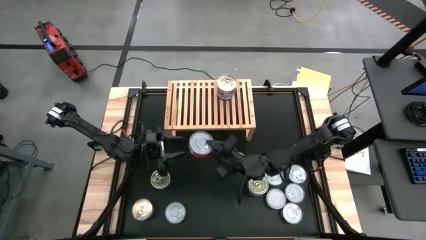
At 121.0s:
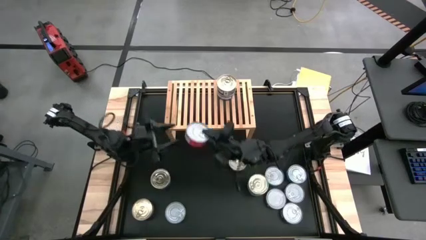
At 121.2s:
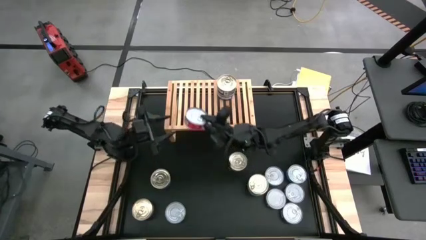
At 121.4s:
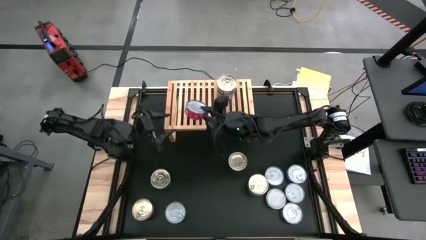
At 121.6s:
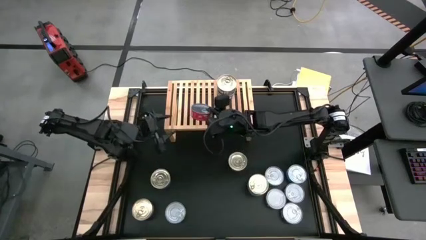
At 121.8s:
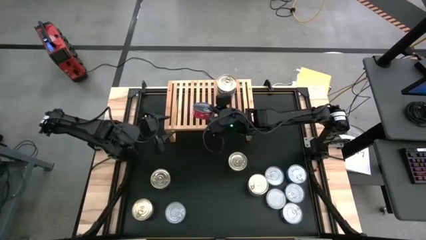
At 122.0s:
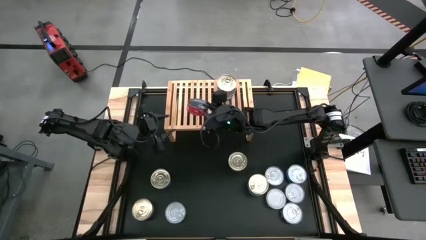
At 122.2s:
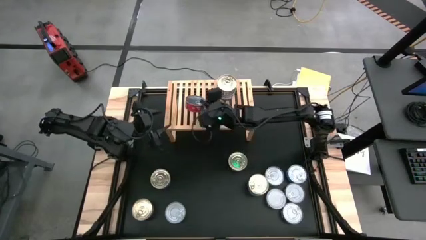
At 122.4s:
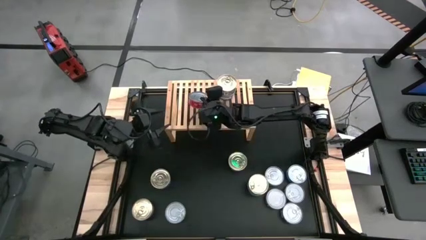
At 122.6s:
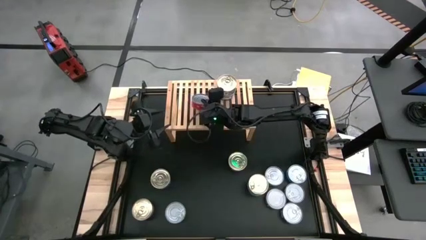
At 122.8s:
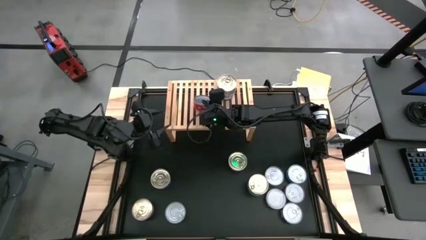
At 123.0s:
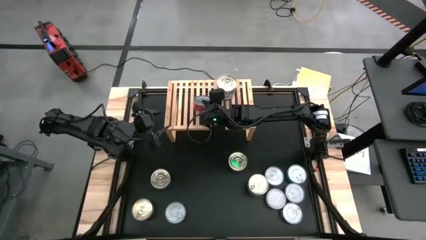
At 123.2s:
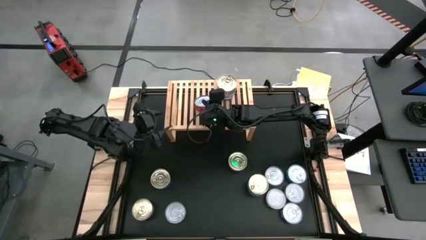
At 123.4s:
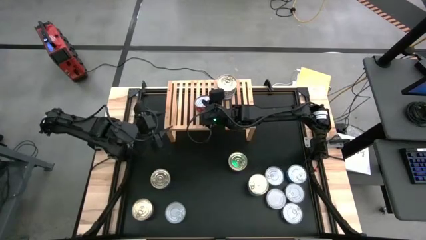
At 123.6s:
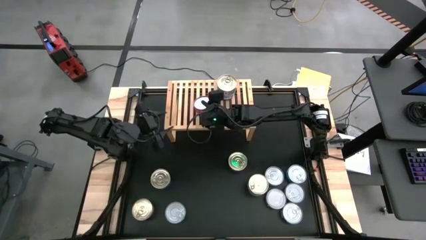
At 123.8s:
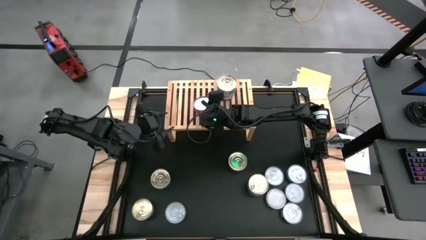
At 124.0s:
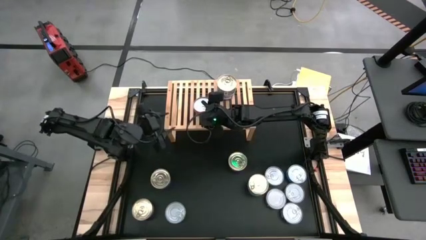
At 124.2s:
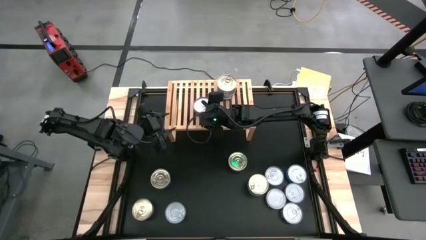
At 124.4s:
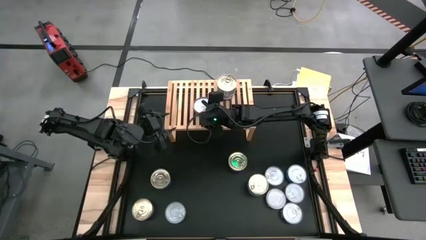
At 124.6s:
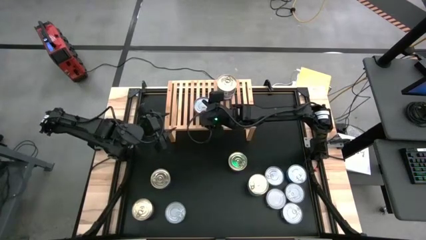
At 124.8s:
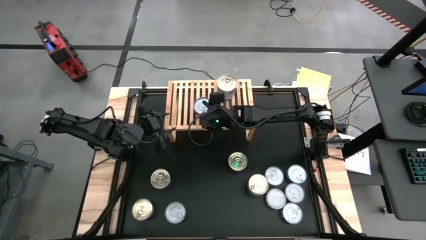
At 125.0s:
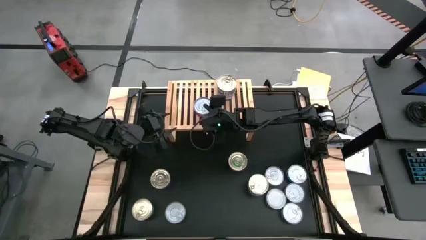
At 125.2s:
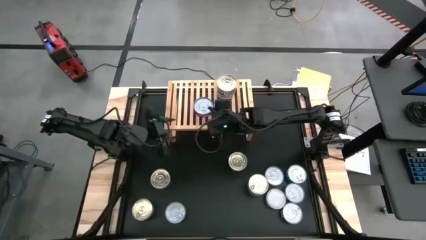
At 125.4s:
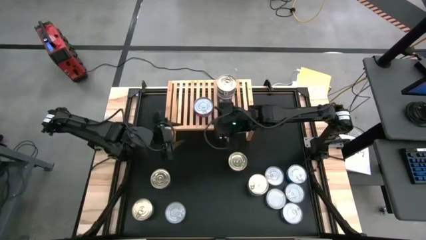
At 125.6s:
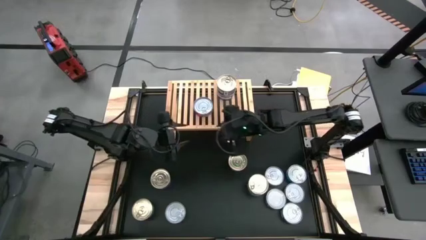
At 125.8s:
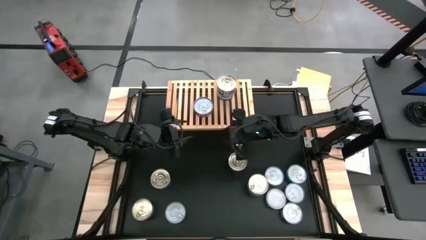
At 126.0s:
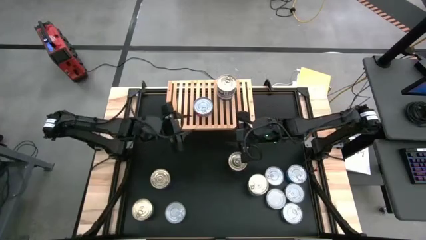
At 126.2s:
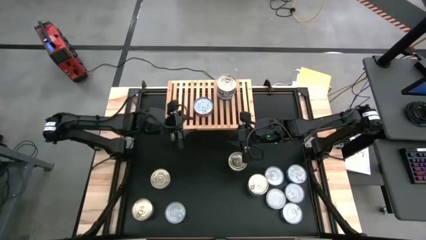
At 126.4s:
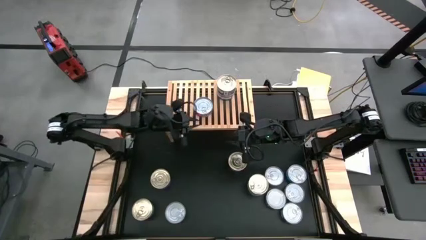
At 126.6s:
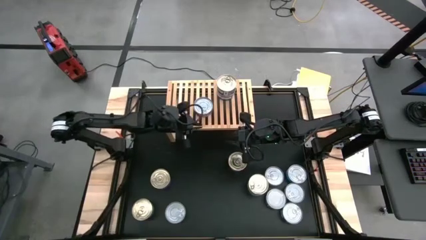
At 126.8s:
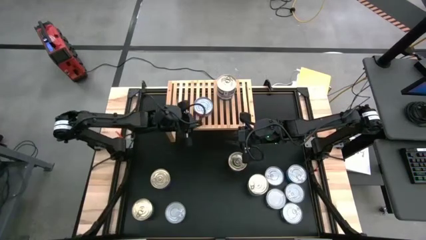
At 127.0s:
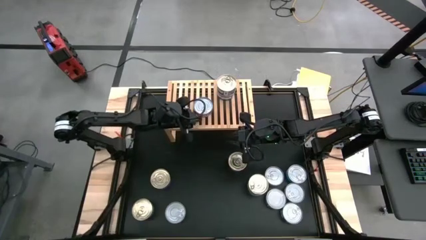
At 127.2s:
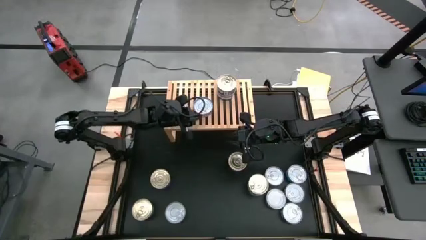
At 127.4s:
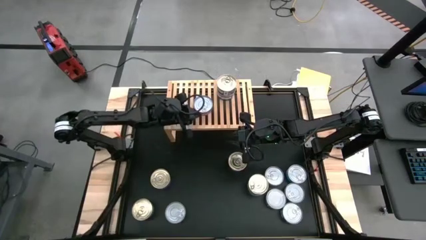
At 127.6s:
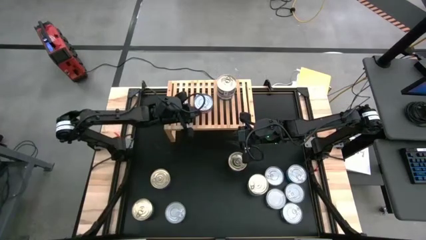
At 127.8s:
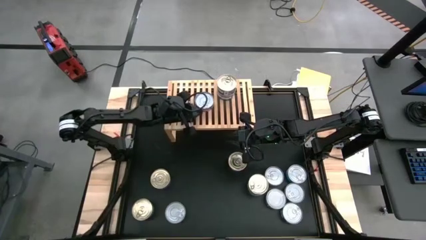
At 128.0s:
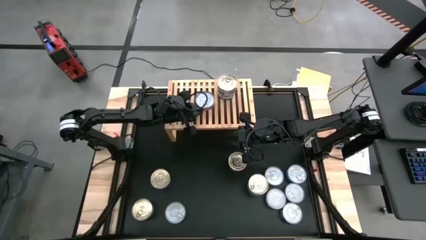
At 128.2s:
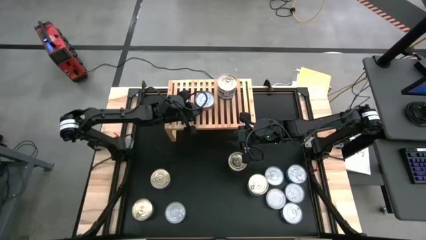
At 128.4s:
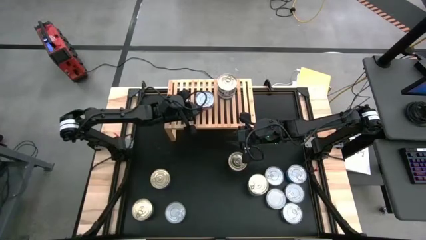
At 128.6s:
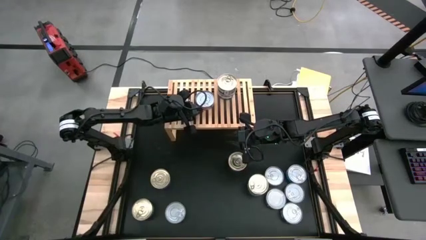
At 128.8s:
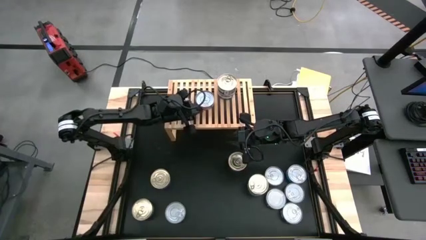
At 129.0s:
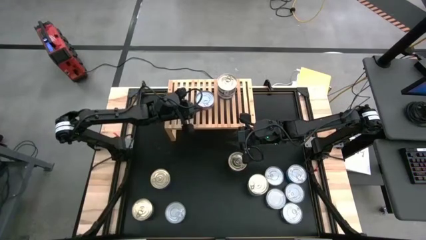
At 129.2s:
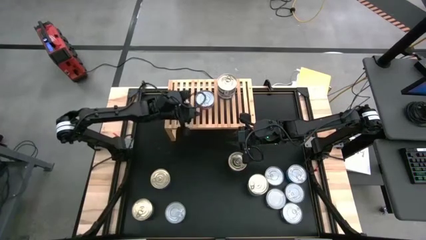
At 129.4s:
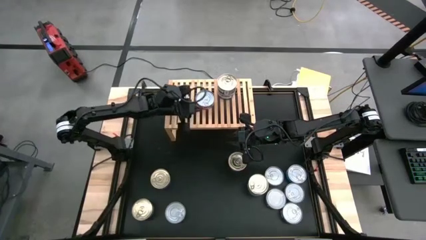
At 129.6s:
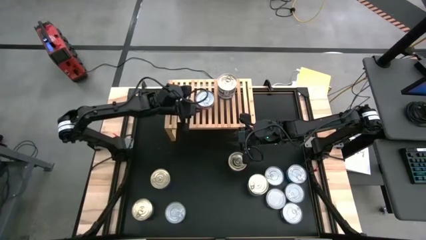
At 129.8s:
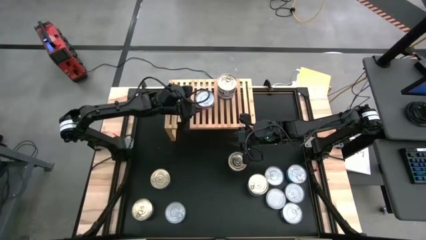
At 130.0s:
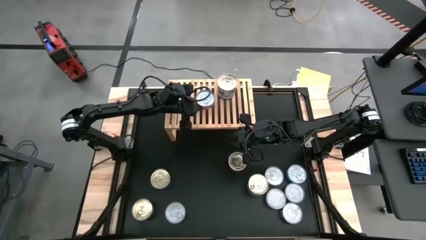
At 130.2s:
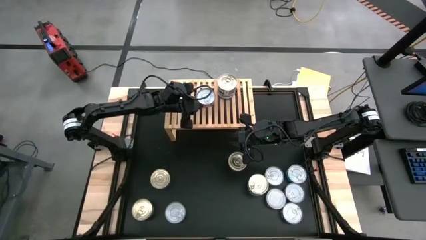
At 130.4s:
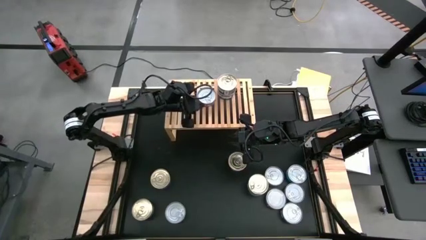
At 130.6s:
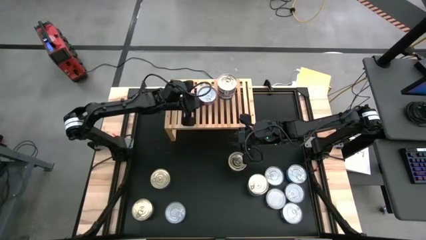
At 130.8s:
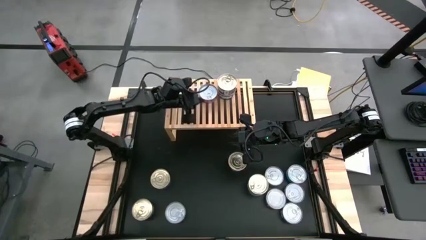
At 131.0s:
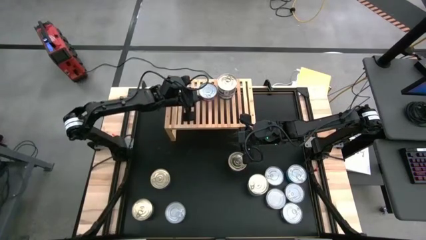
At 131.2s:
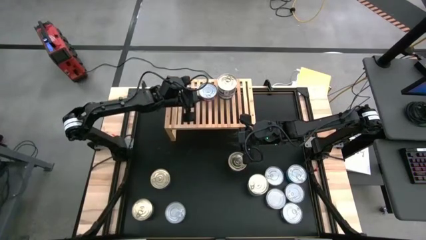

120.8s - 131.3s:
Task: Stack canned seafood by type on shelf
Put the red tuna can on the shelf

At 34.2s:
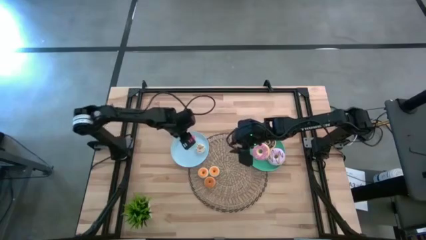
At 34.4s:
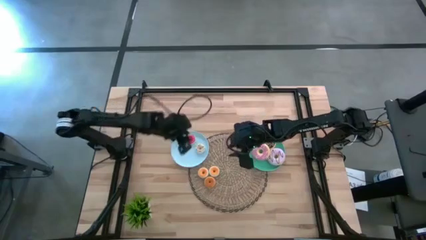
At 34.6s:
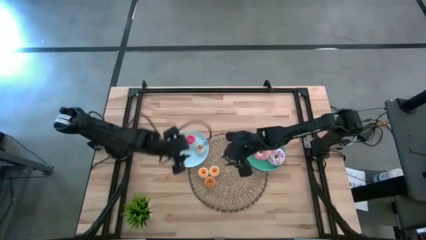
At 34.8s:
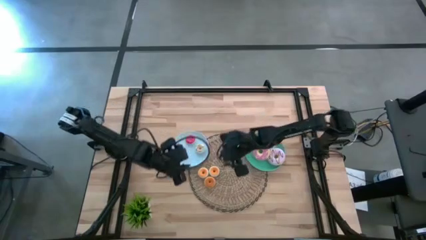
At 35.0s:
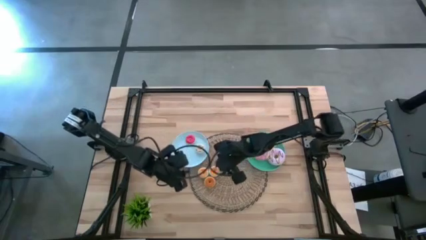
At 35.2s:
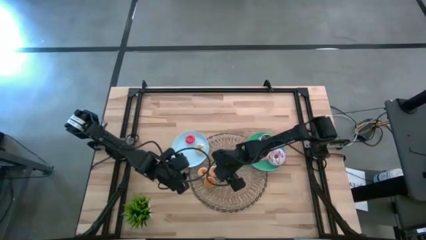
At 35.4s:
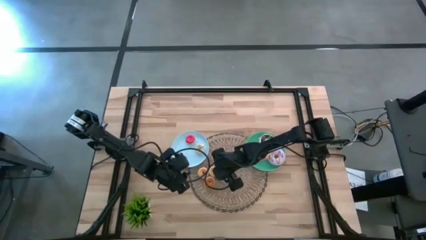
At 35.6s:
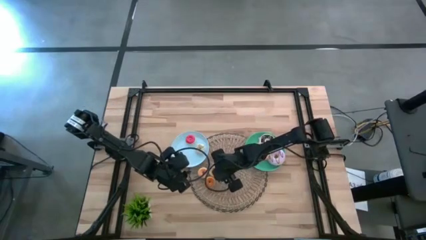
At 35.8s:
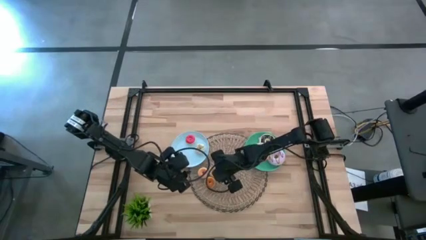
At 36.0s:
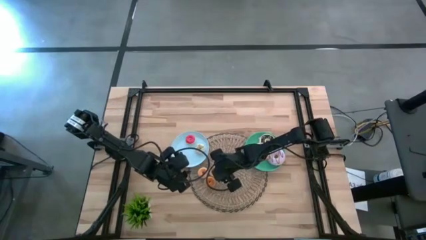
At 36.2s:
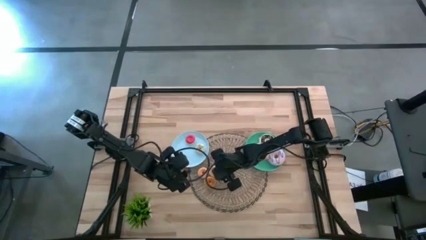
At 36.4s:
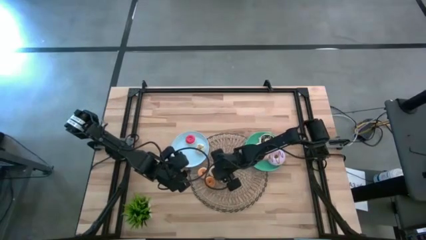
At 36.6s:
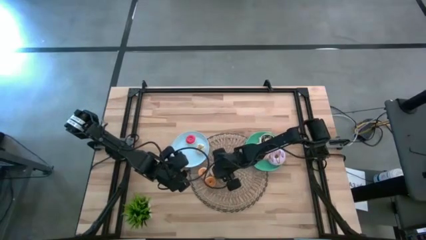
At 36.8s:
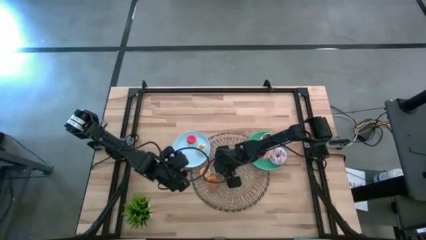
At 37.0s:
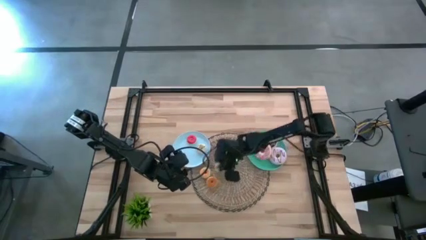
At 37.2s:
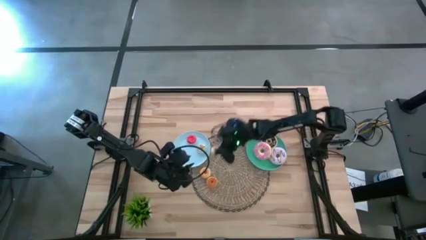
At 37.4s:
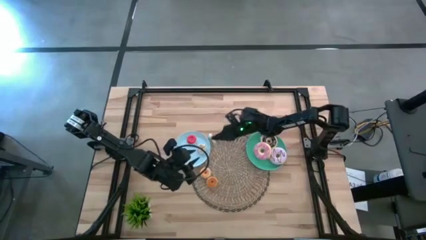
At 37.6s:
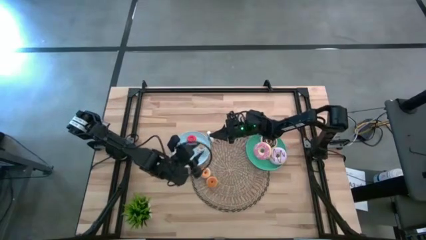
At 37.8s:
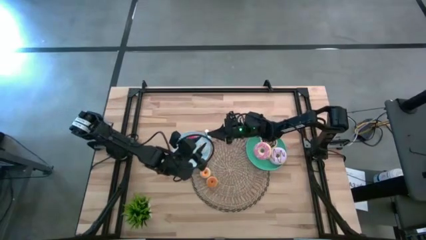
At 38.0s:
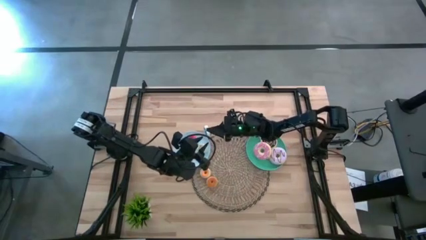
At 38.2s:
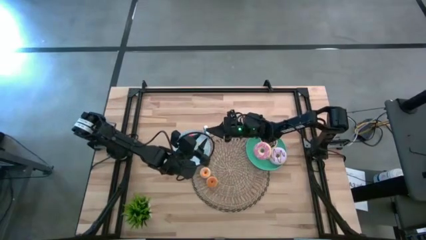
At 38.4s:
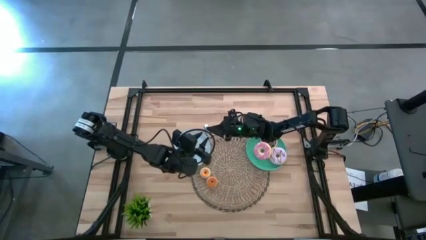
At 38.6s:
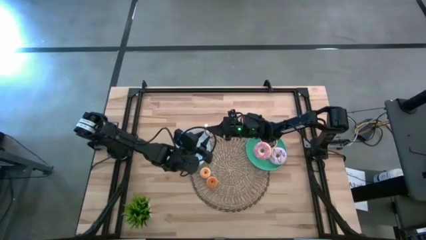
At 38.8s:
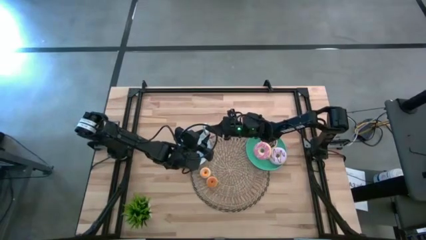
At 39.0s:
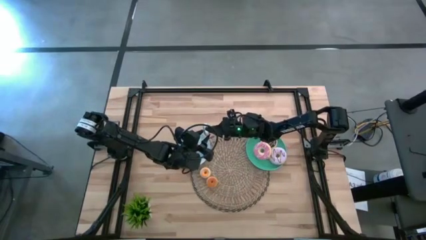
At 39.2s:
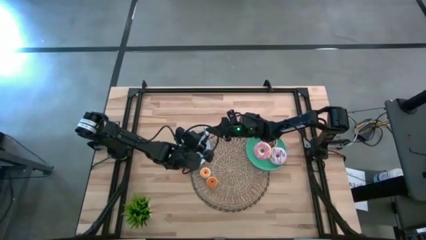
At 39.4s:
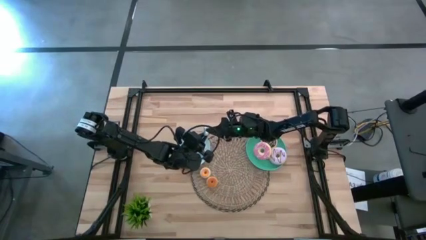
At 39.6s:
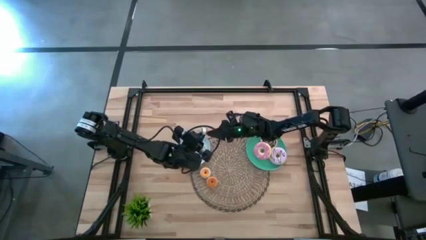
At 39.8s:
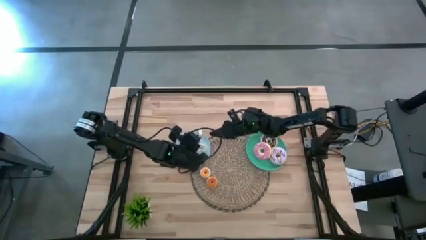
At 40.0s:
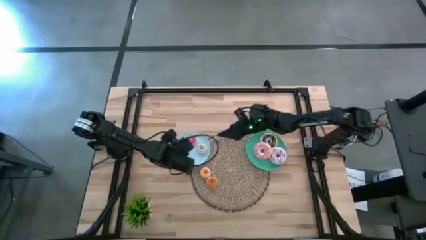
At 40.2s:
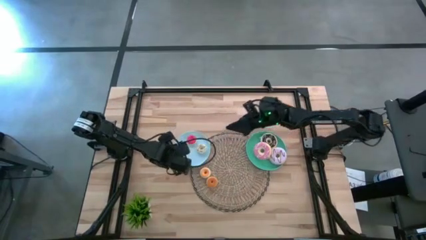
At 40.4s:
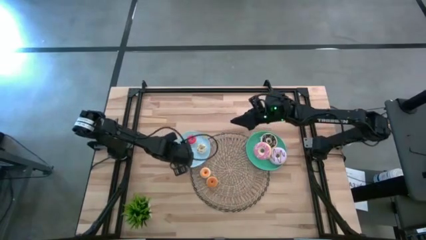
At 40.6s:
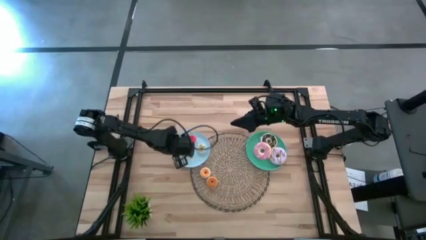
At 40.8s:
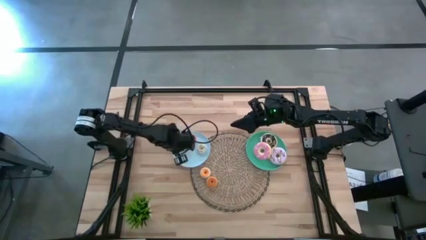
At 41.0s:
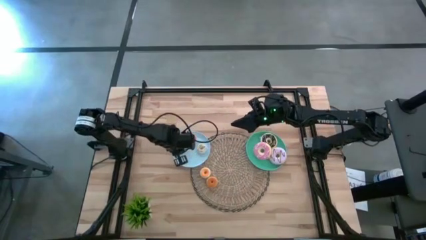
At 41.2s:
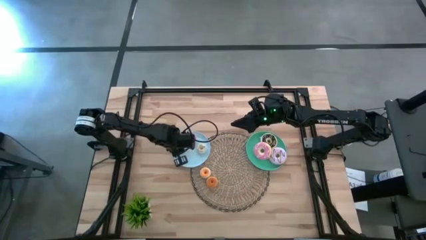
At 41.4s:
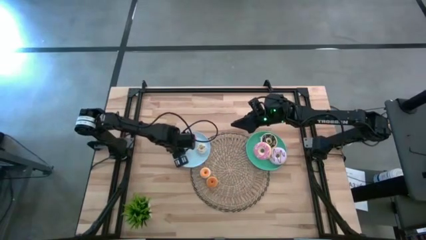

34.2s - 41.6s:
Task: Pick & Place donuts
Put the small blue donut on the blue plate
